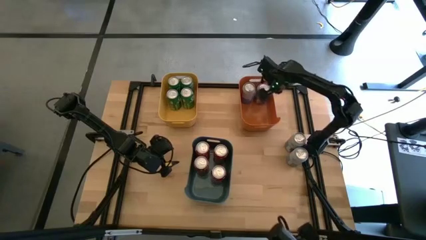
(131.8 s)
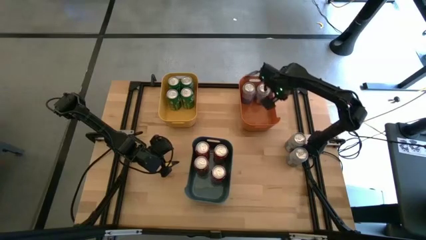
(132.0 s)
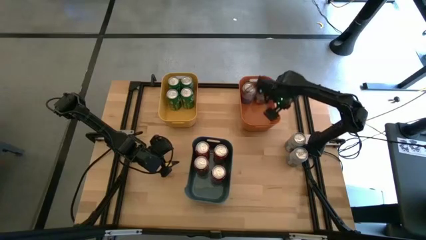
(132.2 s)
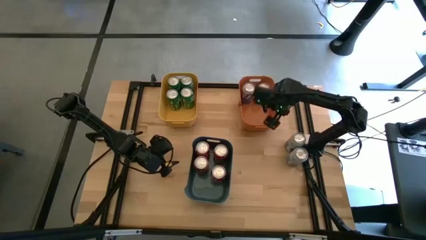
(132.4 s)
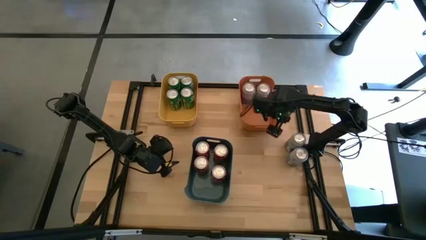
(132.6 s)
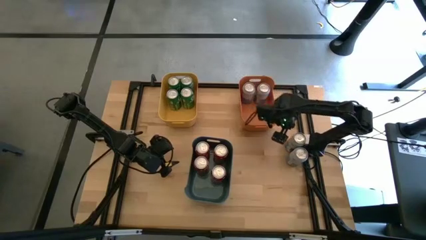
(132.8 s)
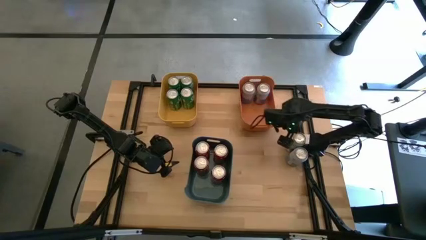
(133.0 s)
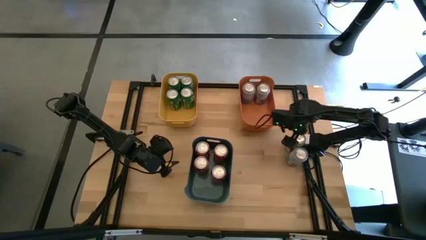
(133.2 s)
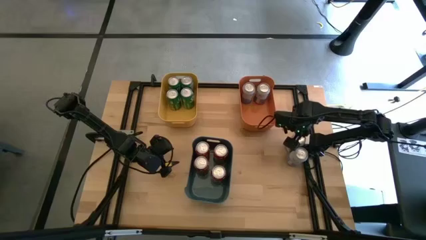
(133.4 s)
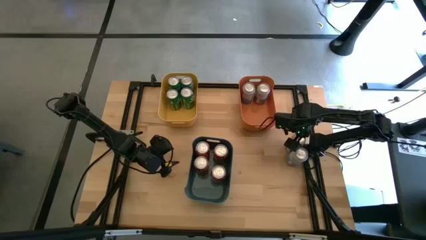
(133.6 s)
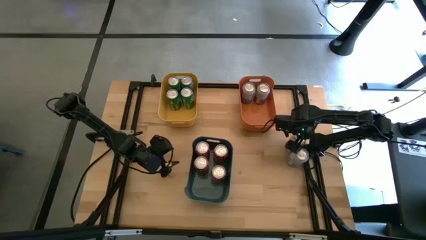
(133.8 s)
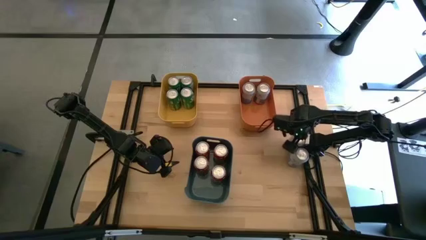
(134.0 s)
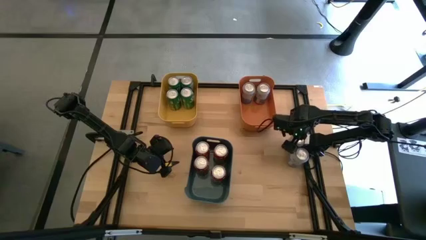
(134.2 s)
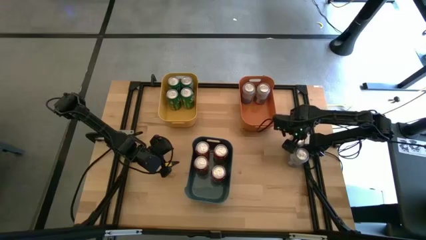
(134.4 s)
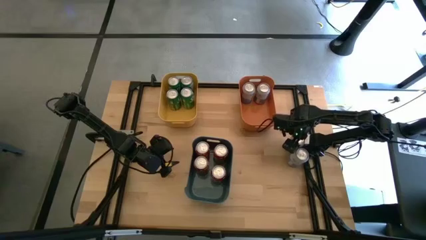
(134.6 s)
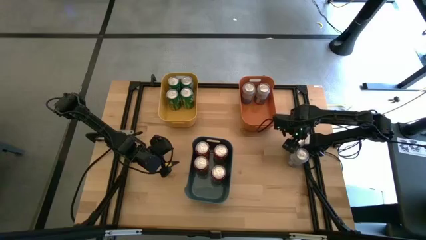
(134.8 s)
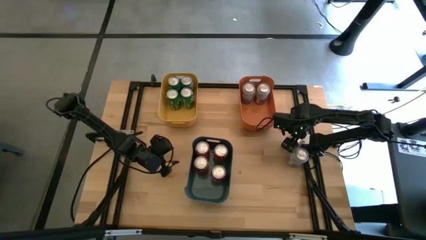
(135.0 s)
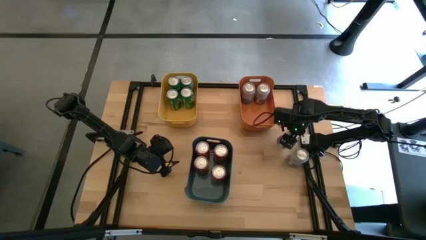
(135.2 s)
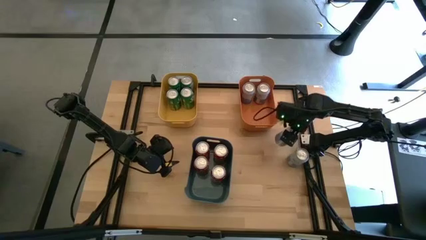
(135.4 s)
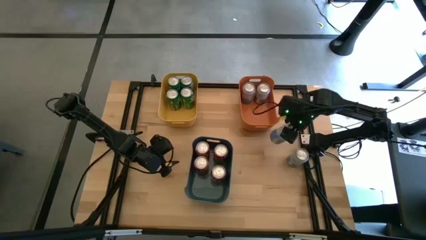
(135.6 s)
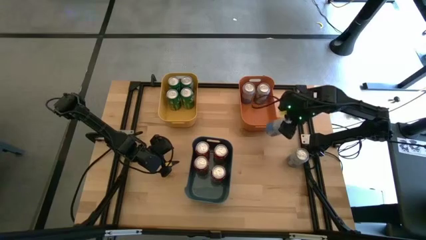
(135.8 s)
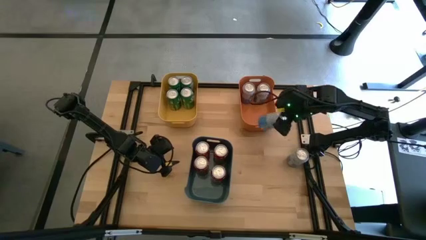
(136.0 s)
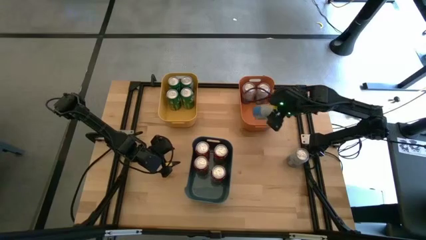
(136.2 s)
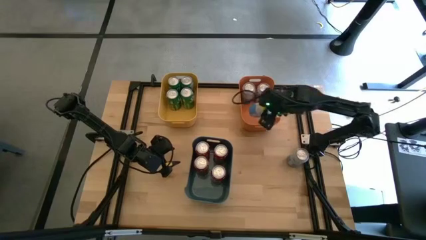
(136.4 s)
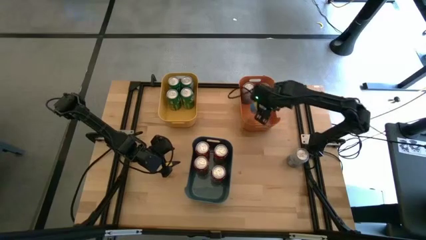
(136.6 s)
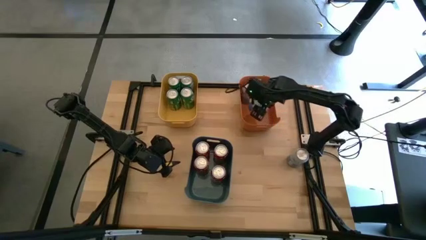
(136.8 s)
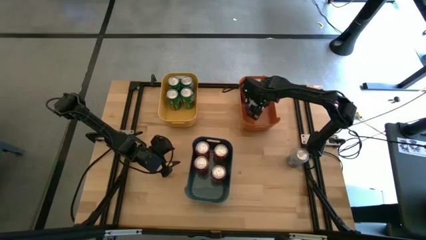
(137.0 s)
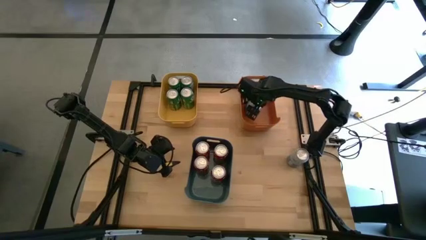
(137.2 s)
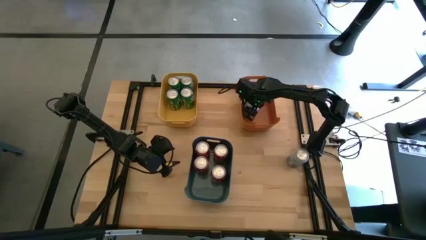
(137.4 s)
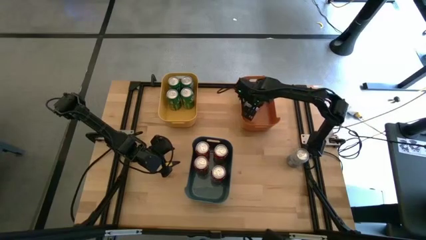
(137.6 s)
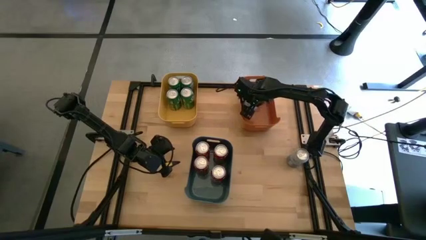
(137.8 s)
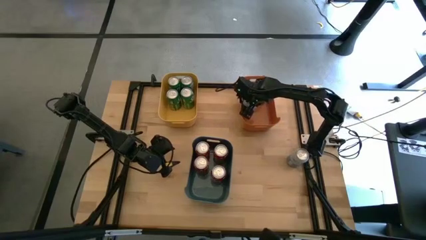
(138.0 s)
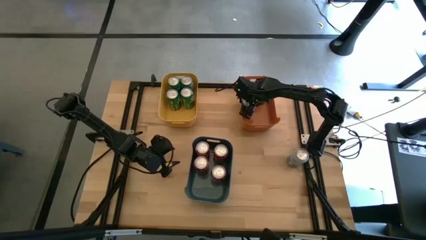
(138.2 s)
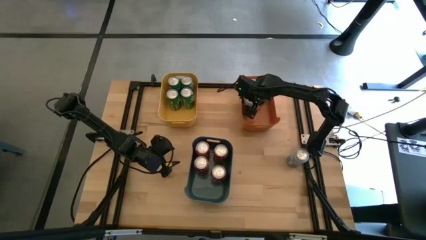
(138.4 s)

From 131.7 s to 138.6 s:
Task: Sort soda cans
Put the blue-white soda can into the orange bin

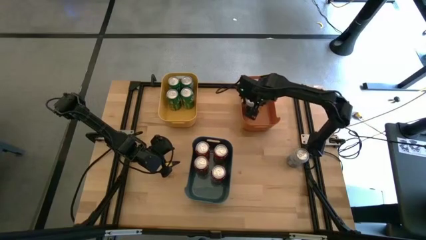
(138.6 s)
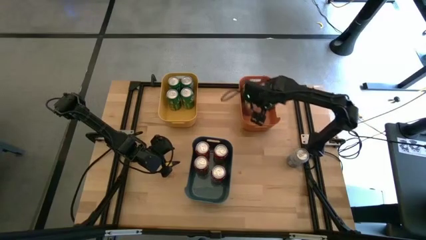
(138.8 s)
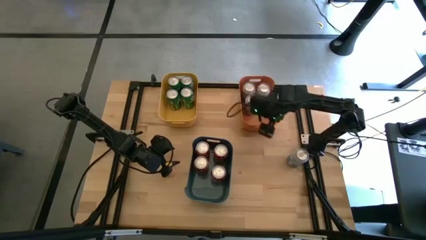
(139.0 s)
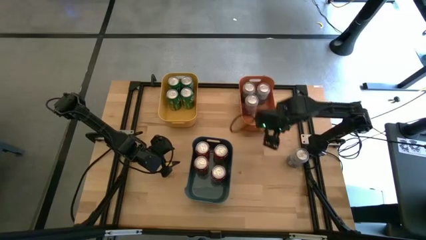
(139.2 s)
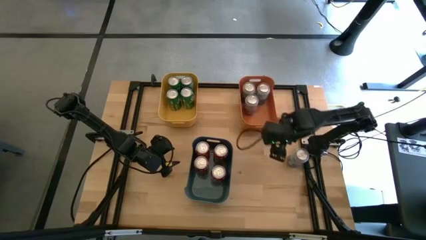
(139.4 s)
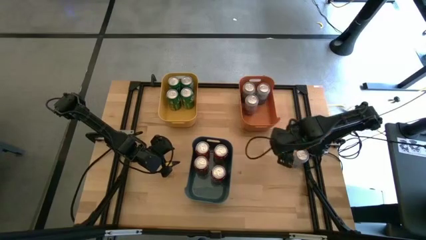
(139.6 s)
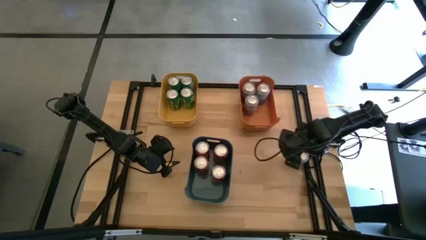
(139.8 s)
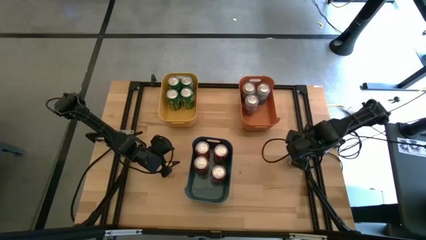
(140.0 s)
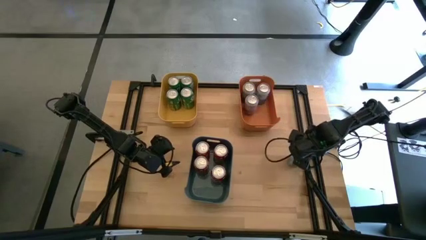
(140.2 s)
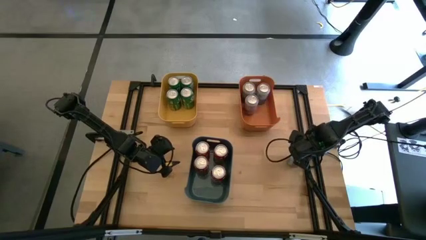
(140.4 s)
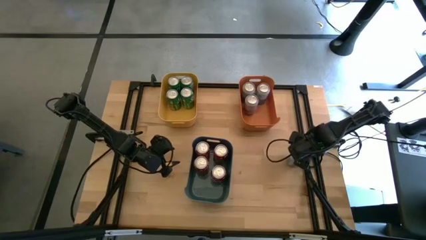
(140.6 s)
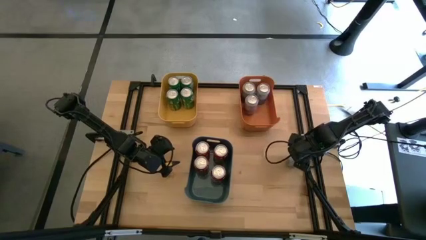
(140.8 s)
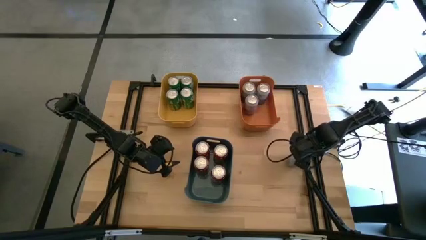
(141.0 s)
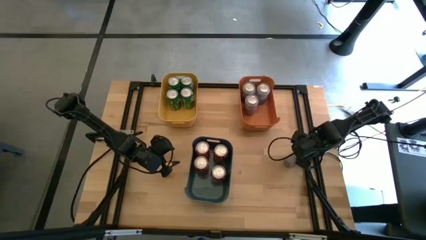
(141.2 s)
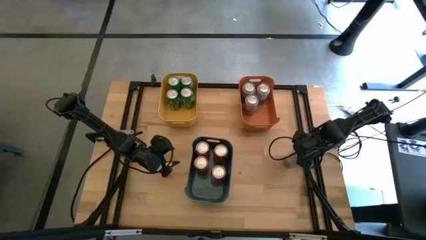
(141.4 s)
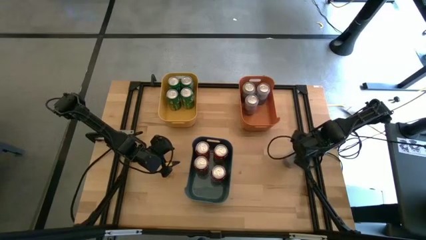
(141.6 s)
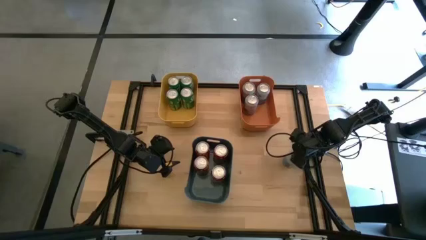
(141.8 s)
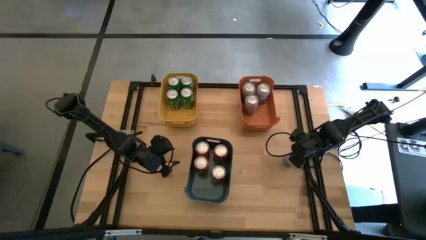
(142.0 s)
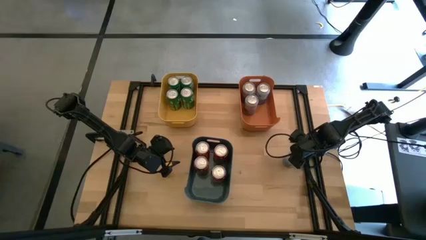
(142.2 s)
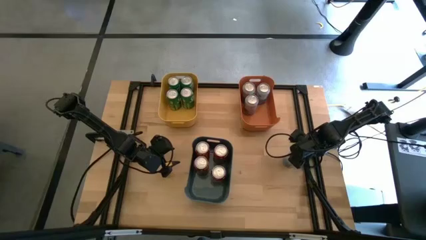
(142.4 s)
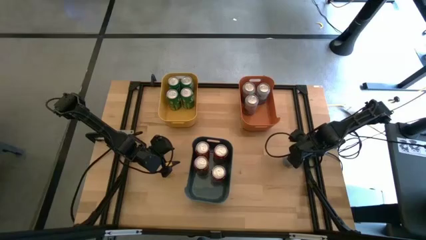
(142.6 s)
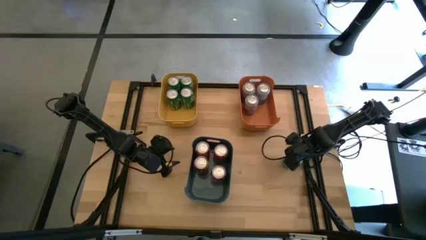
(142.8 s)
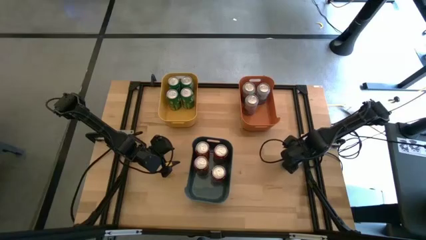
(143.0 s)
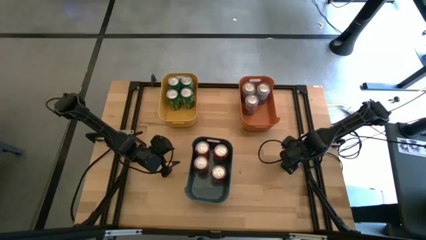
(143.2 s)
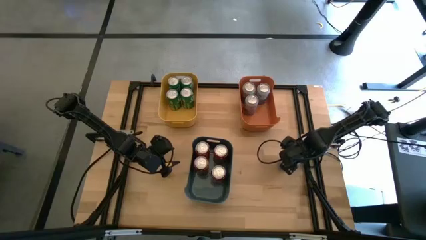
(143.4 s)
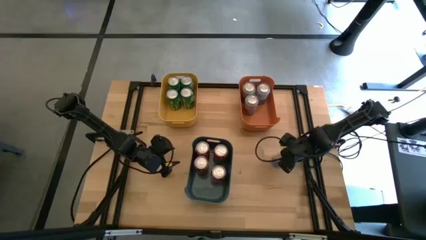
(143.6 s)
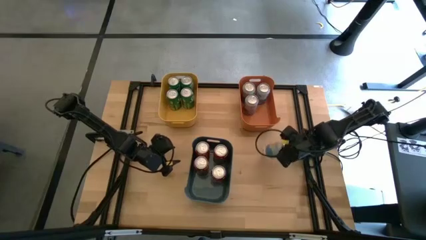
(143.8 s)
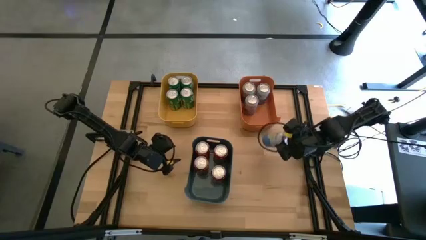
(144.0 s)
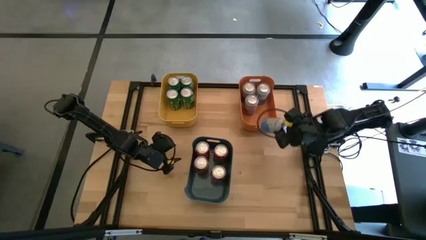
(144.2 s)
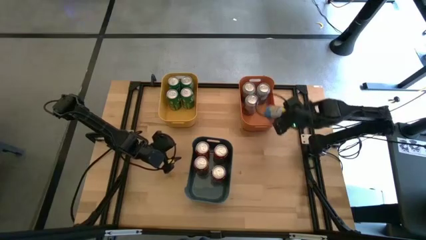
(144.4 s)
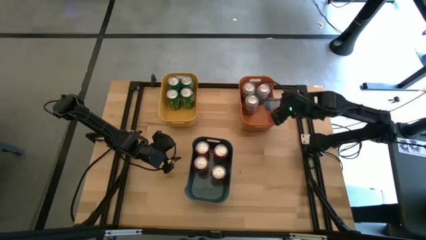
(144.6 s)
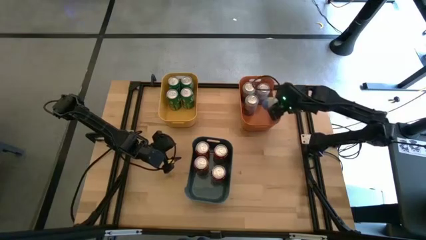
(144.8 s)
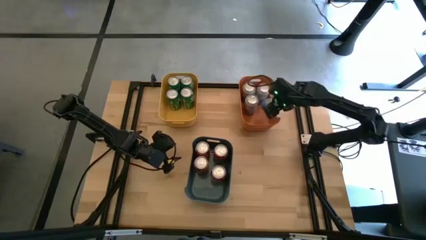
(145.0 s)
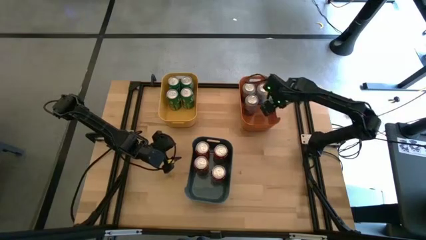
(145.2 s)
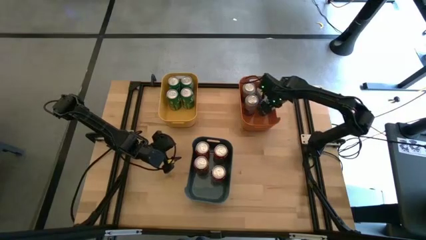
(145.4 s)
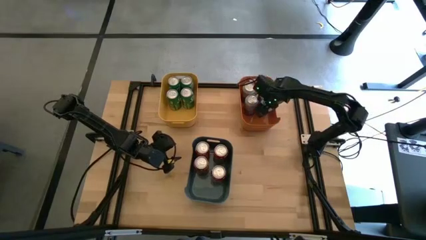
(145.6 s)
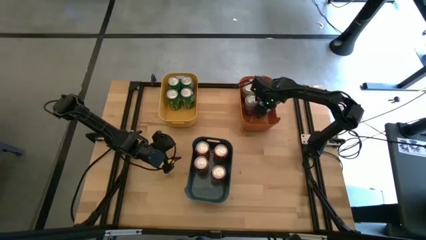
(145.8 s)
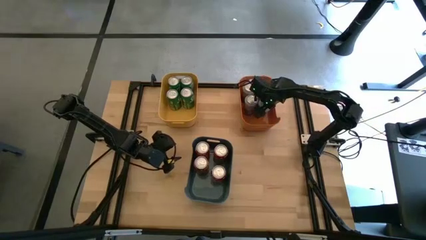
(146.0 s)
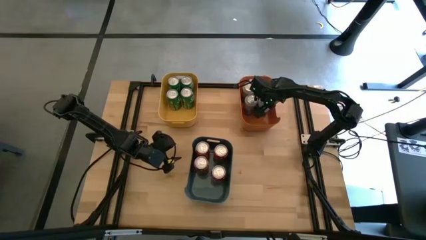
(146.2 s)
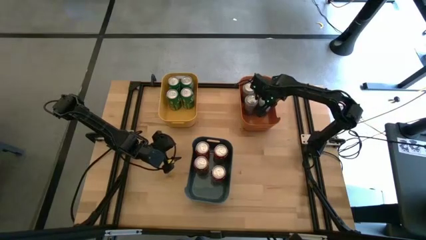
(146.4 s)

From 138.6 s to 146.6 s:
Put the blue-white soda can into the orange bin

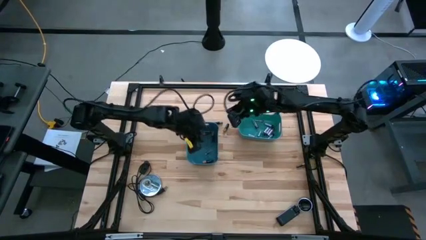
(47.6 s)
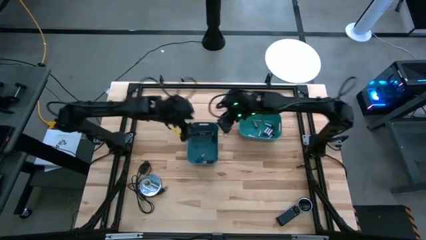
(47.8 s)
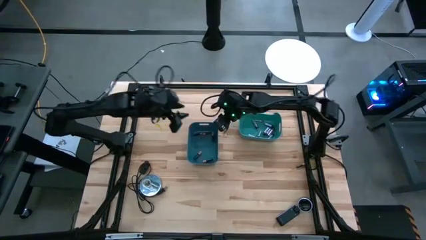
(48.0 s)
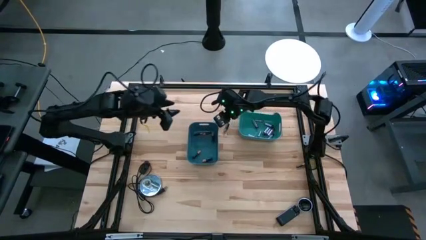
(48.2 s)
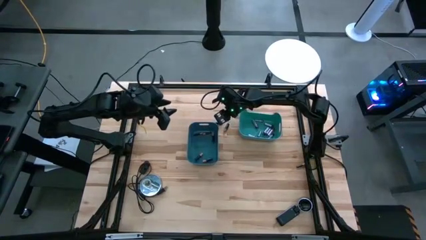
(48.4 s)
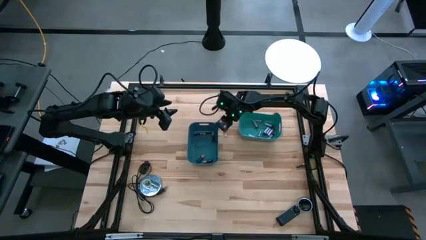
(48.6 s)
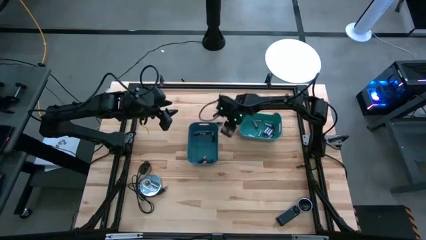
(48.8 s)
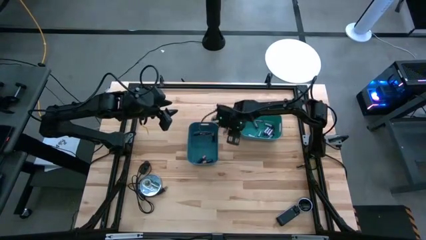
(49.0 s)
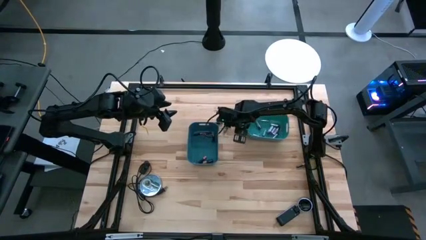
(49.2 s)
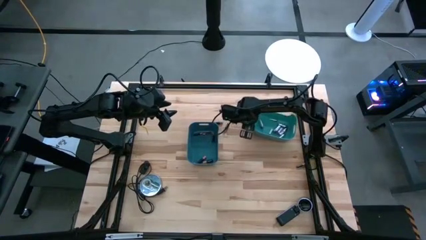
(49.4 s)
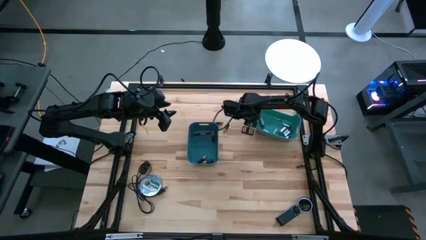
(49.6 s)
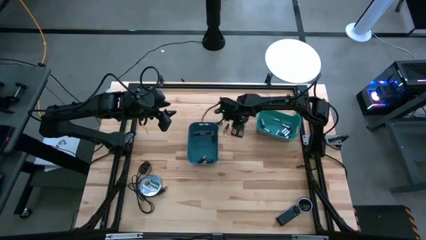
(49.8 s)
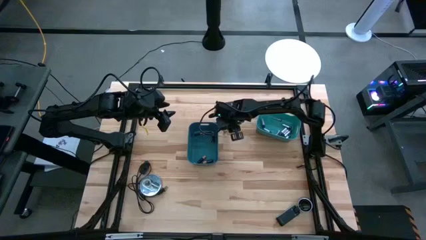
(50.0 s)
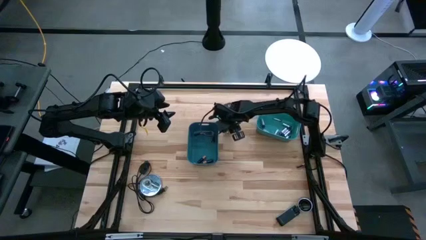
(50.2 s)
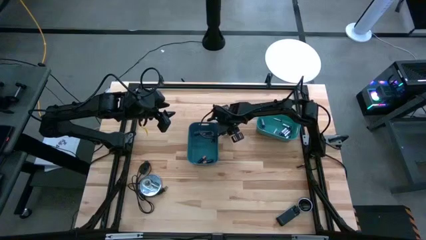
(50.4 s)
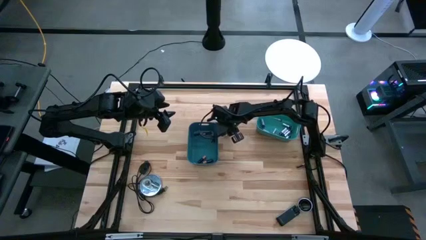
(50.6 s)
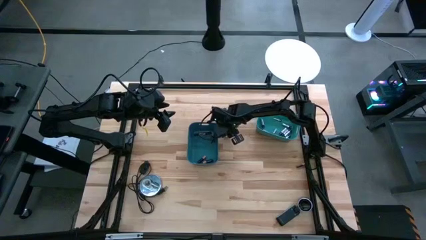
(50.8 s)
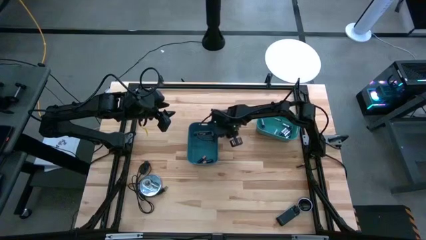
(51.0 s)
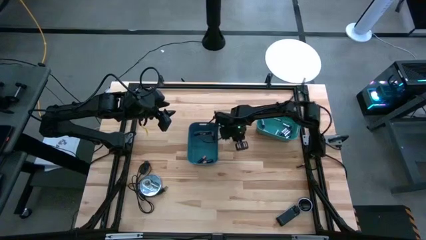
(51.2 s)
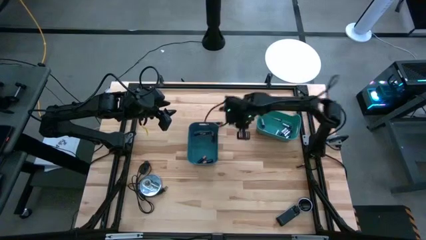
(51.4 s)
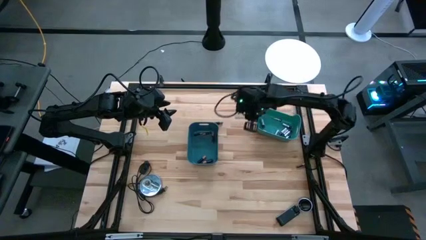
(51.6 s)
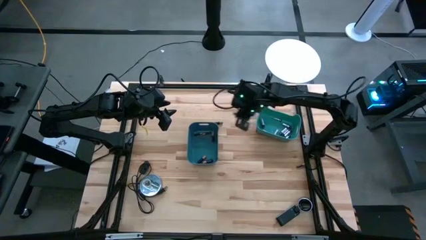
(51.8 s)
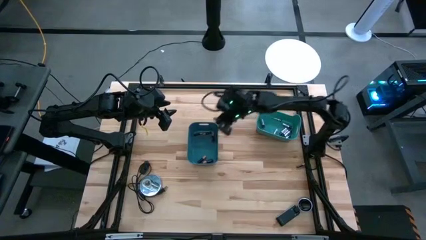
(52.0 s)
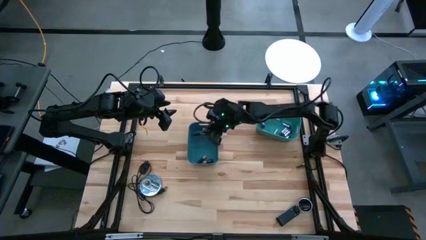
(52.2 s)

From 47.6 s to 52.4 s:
Task: Sort batteries
Put the black battery into the blue bin
